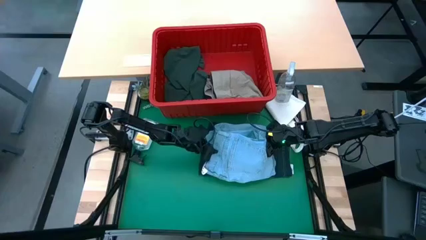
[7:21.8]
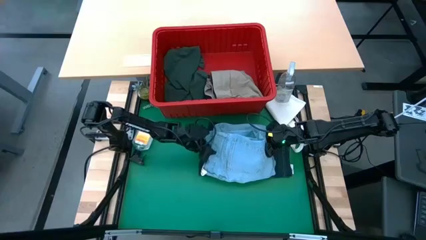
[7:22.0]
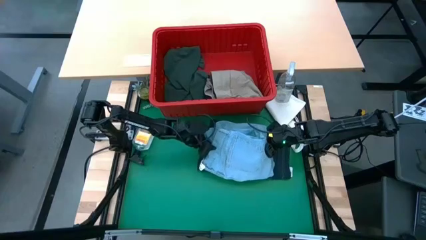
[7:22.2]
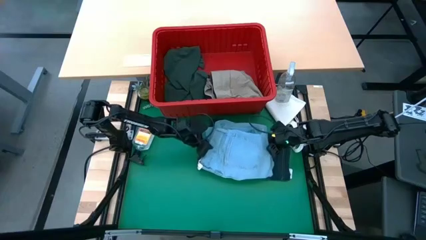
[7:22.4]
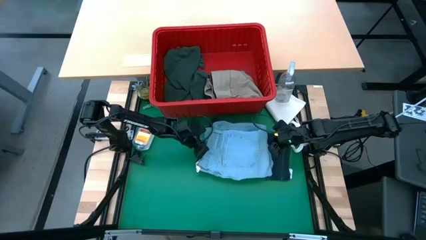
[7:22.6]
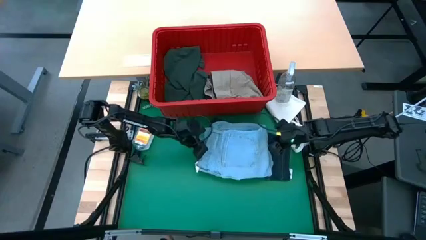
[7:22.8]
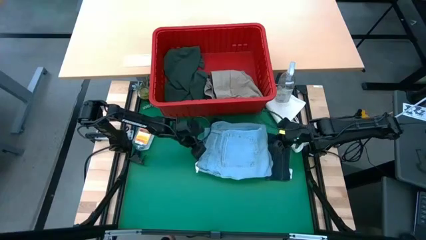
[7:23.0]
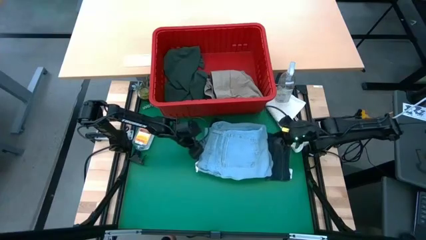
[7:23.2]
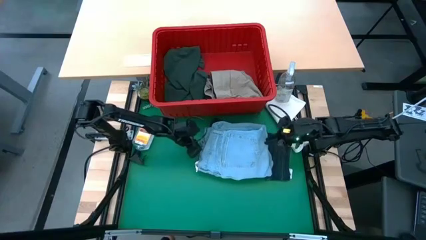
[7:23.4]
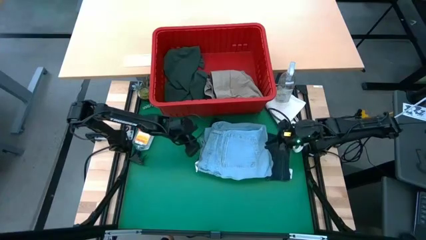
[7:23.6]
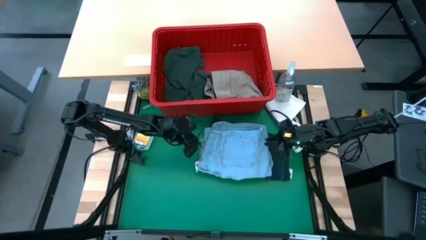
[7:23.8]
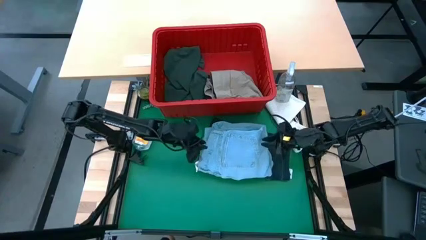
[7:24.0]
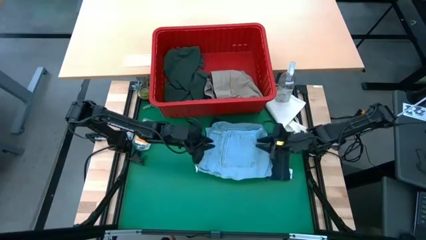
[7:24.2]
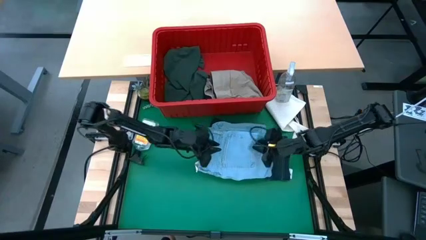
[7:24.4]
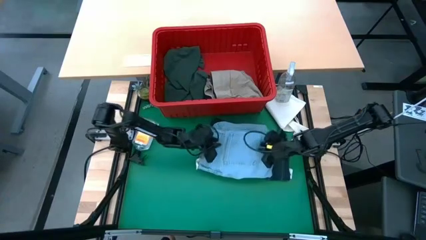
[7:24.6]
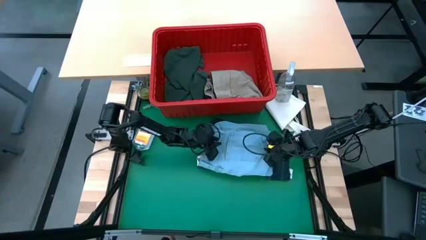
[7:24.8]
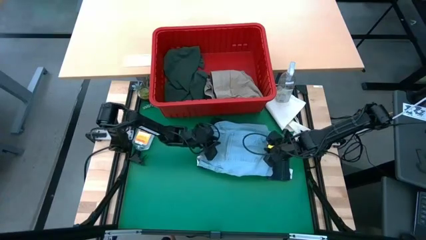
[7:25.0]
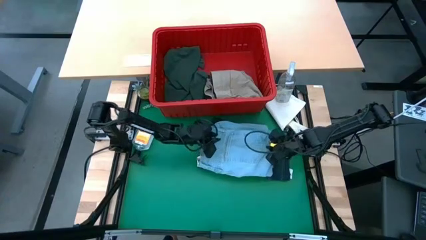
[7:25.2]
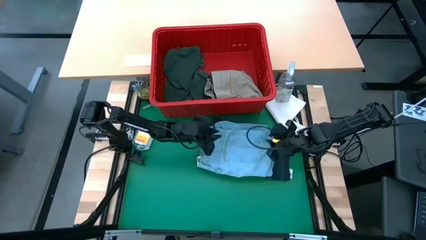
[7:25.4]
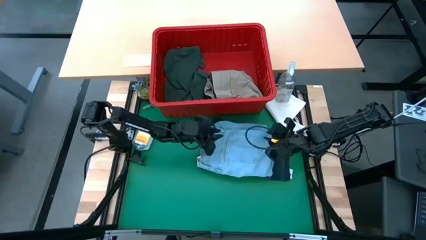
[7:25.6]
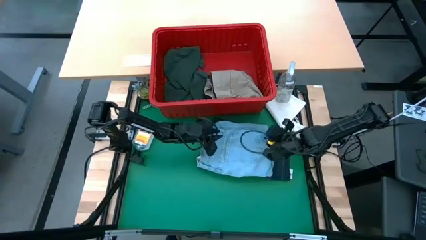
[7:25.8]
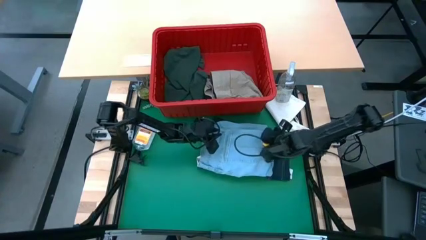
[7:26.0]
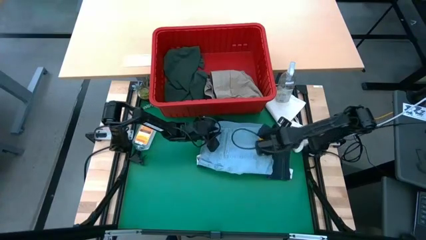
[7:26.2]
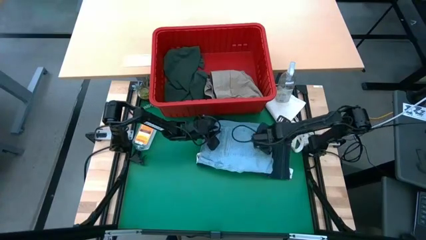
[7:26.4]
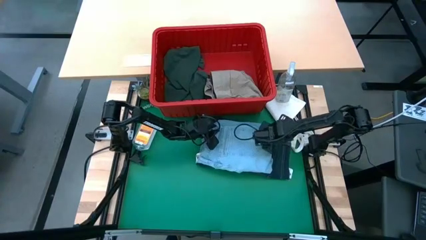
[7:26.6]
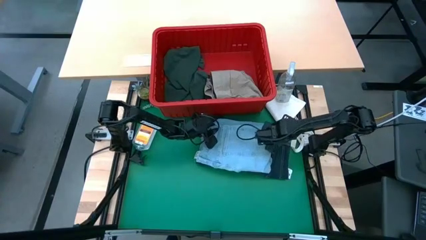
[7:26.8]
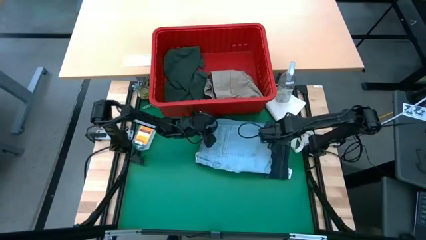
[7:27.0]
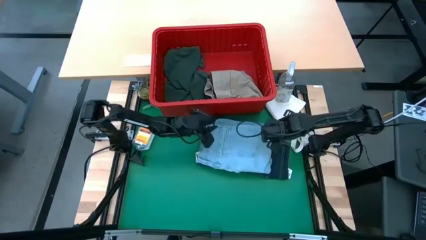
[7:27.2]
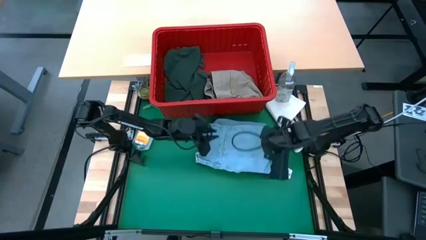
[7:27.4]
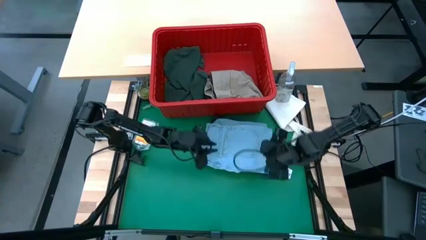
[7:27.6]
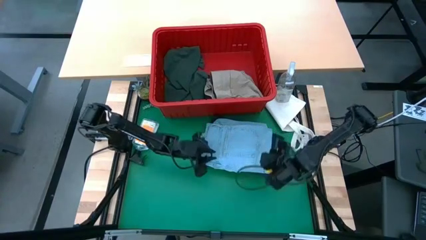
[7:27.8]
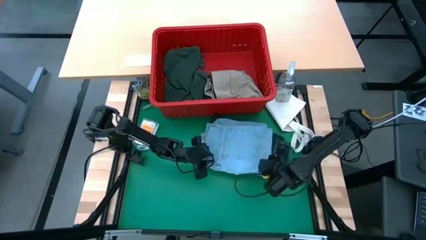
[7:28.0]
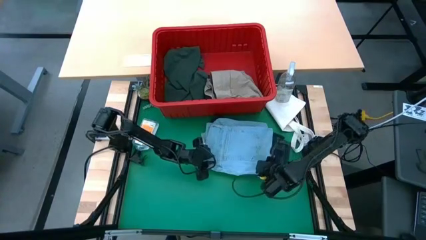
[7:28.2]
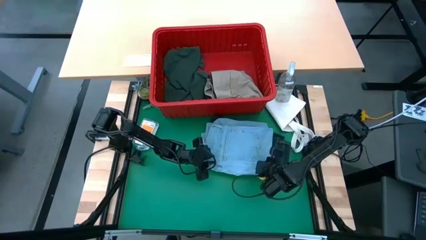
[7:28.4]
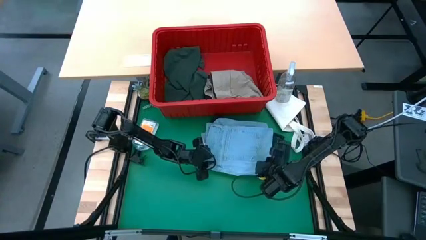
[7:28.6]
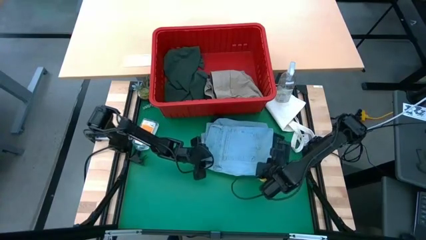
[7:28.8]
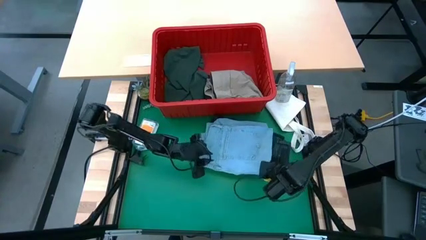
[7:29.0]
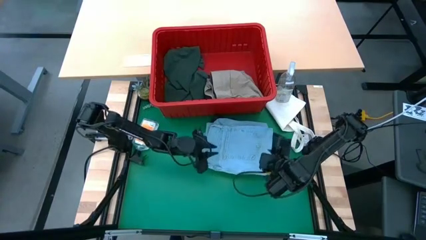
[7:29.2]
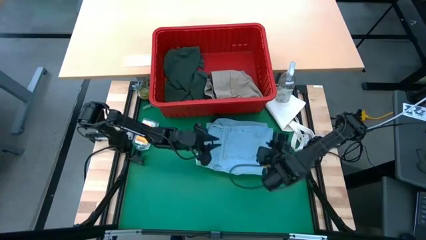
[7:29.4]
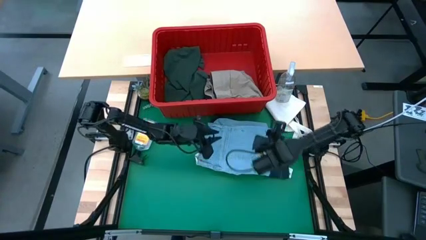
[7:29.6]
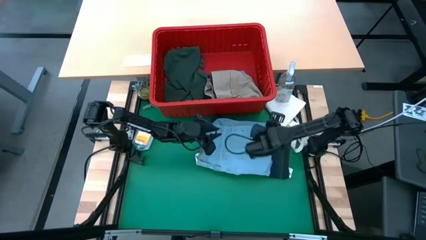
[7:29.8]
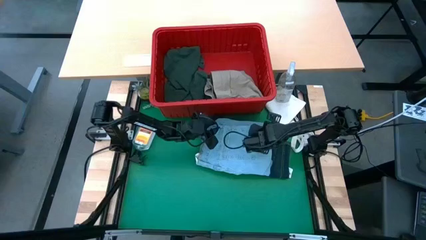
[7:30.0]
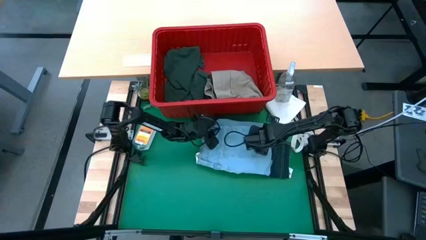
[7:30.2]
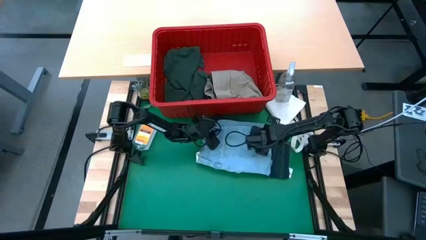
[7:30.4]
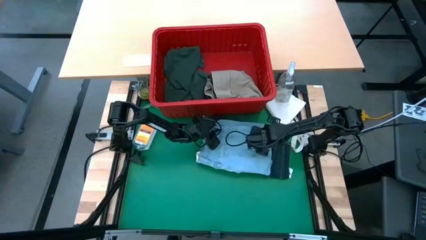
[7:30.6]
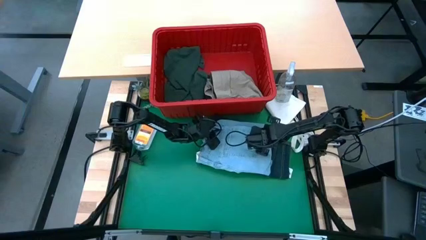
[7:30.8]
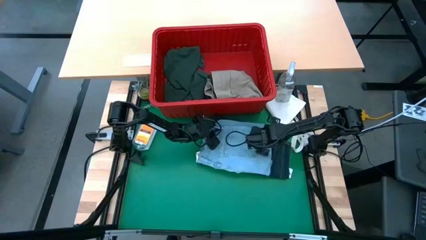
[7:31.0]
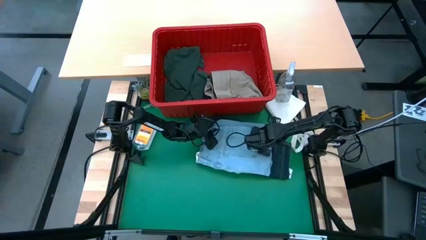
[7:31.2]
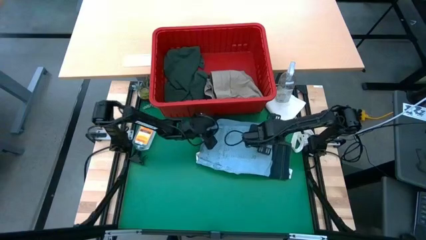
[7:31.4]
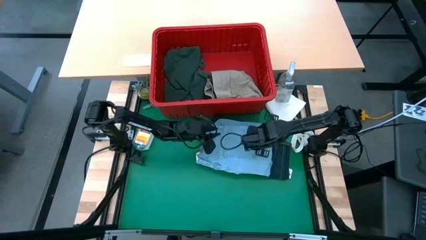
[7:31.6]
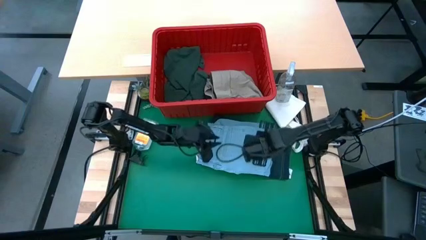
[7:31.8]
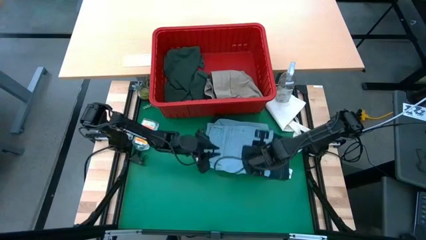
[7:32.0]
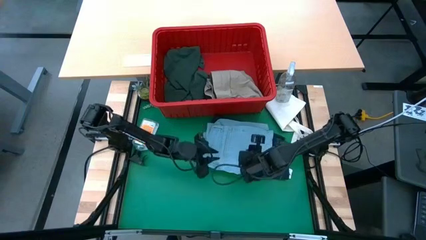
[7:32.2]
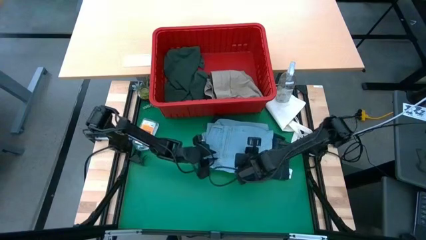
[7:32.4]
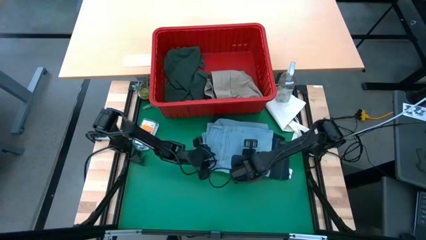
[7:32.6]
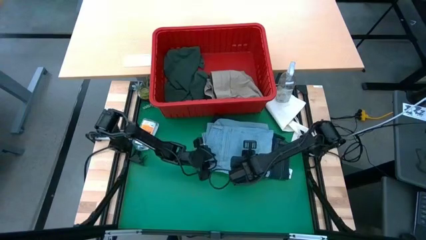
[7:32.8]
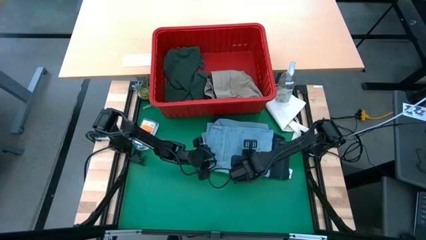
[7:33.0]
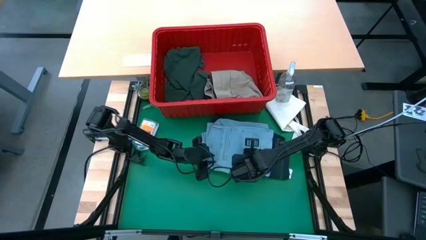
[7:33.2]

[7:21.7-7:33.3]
Task: Fold laundry
Stack the light blue jeans on top of the dark blue jeans

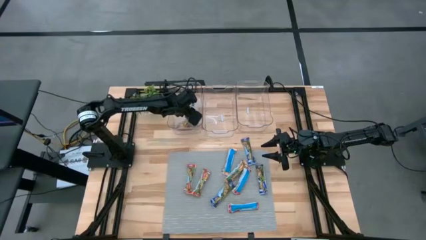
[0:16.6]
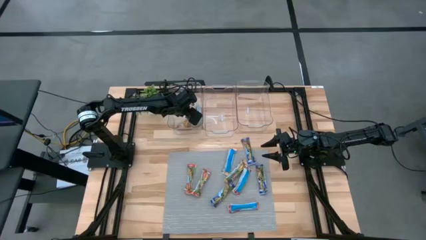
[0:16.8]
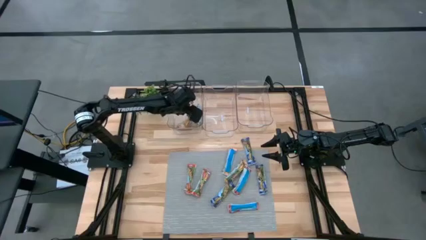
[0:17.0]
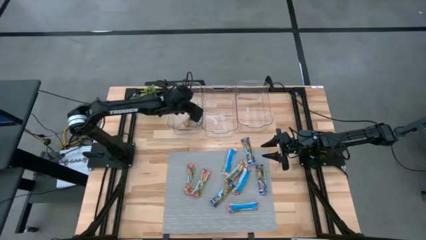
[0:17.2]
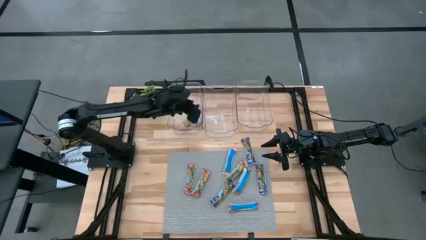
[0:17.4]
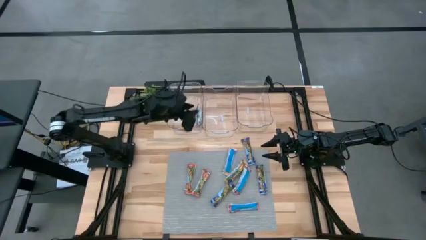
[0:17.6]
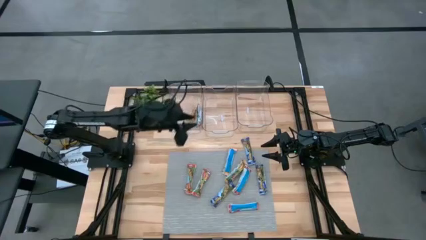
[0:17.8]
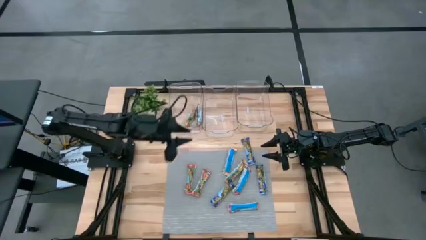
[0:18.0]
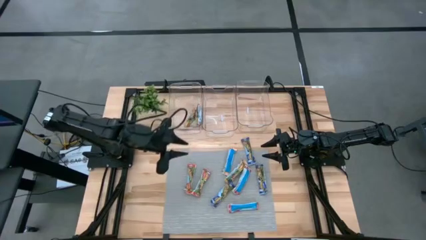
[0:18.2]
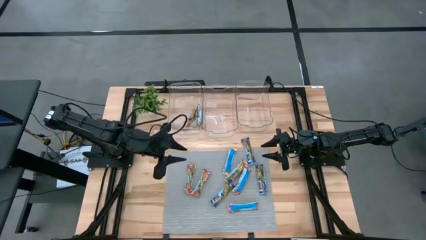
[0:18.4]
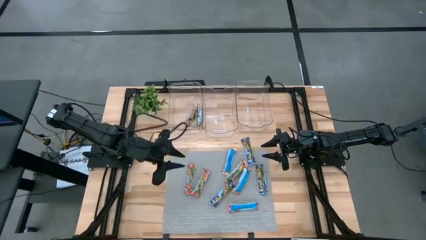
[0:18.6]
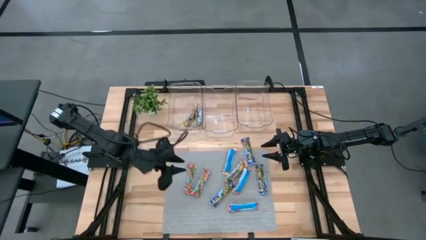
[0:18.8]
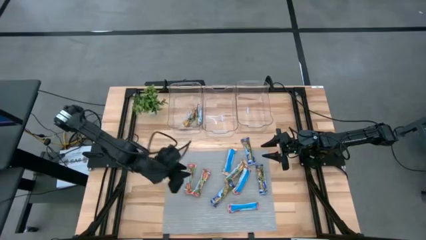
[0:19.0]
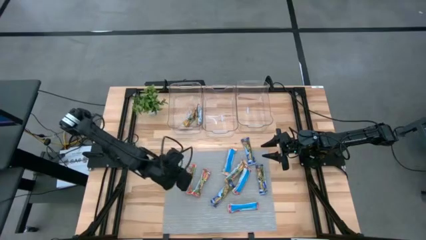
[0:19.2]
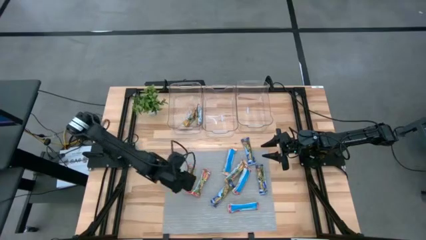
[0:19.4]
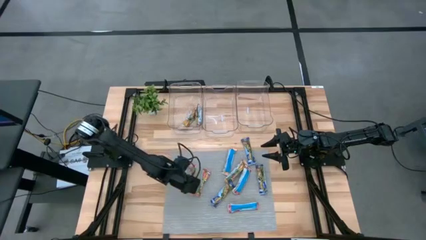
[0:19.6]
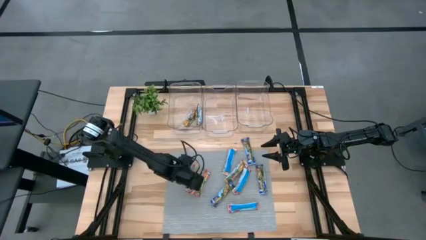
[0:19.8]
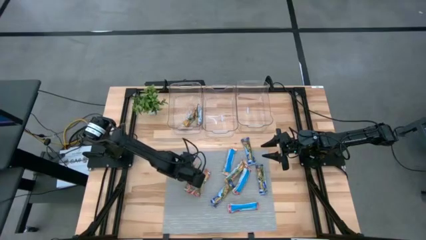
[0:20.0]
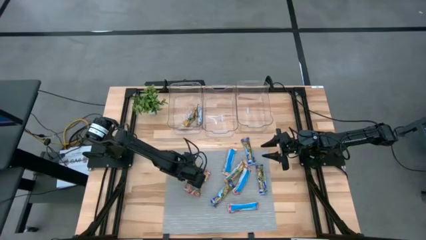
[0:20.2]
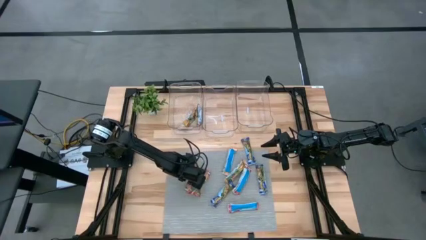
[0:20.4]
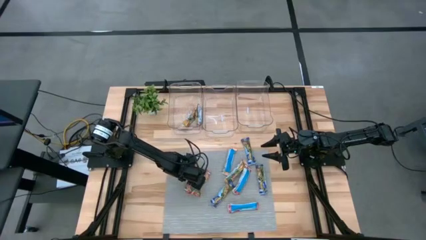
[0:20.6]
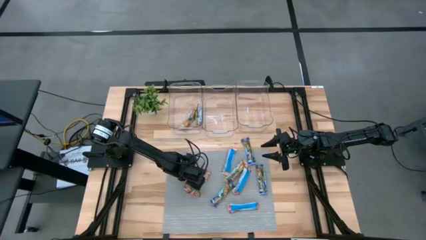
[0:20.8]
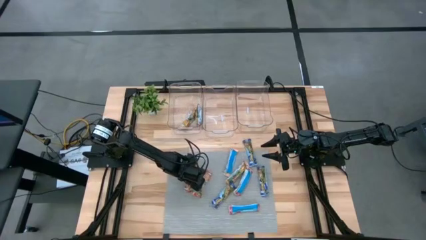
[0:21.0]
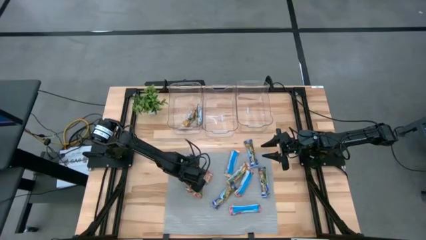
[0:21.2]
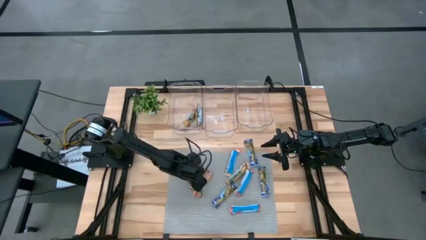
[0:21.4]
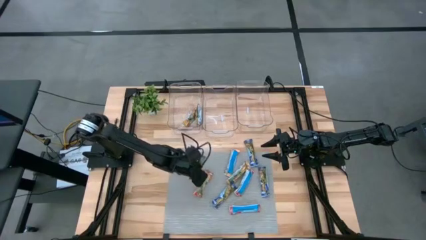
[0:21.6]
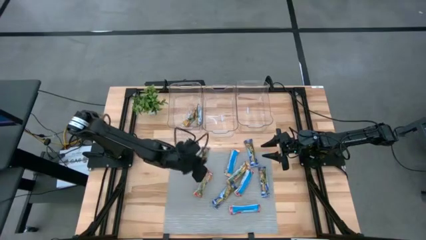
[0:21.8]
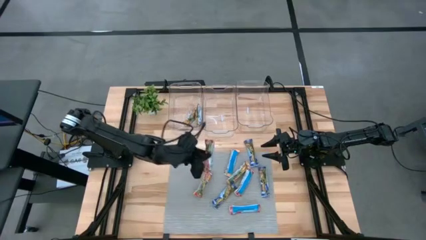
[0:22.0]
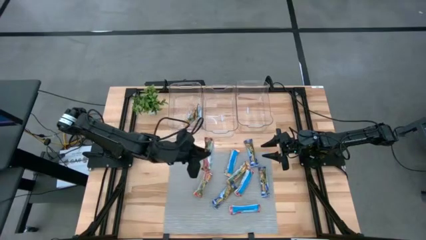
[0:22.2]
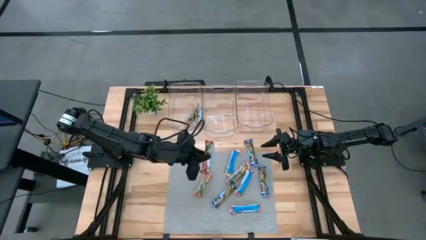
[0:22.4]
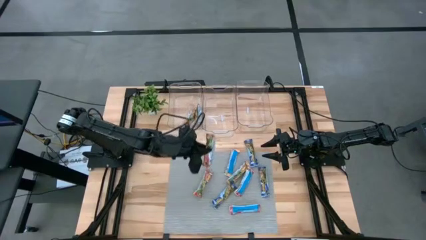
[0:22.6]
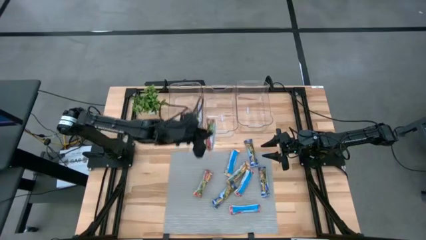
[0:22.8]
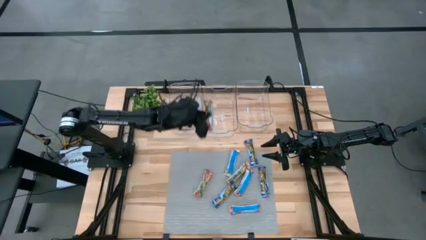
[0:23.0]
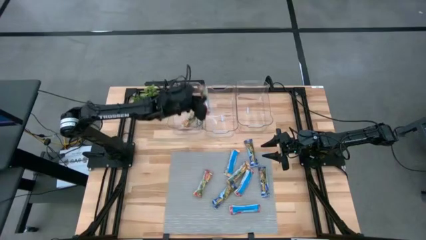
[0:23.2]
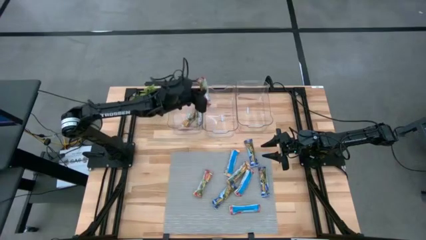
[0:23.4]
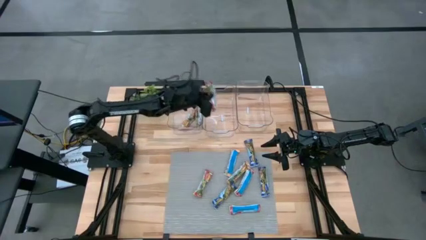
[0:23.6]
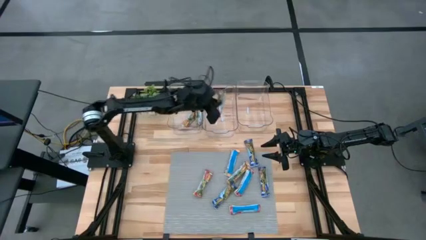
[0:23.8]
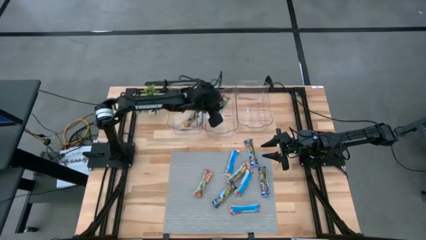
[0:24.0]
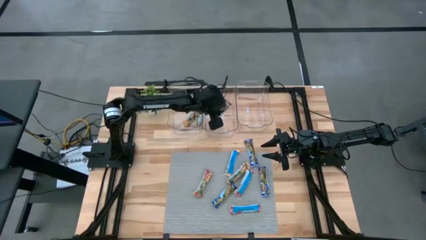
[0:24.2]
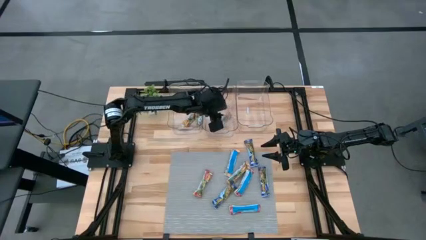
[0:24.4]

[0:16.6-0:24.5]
Task: Pick and place Granola Bars by type
Put the red granola bar into the middle transparent bin
